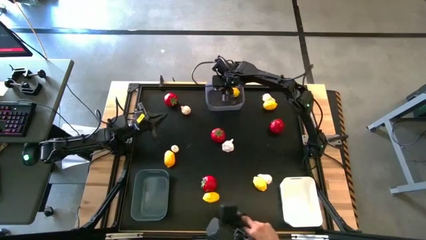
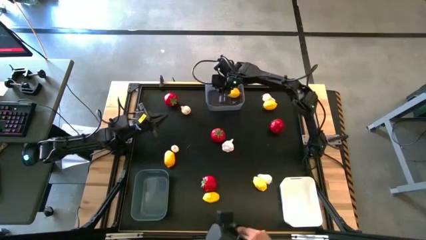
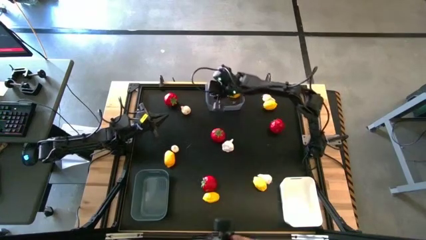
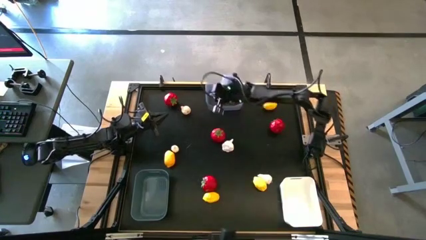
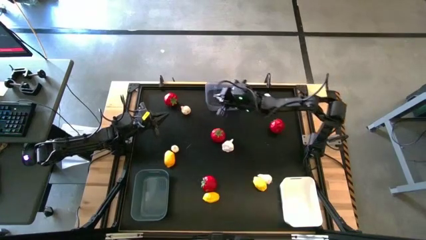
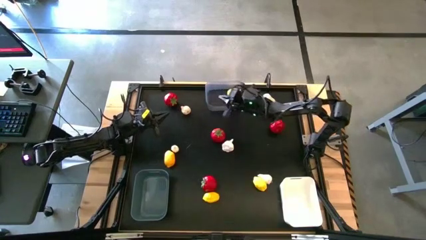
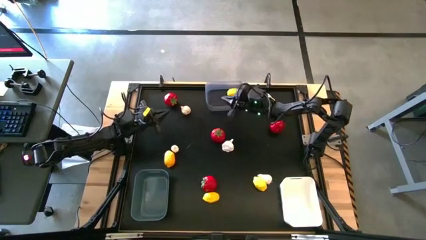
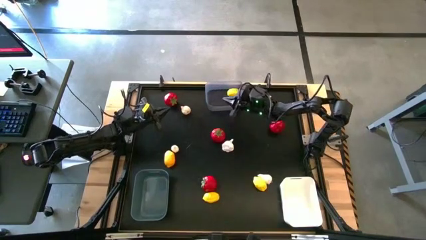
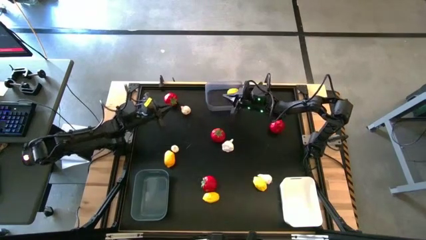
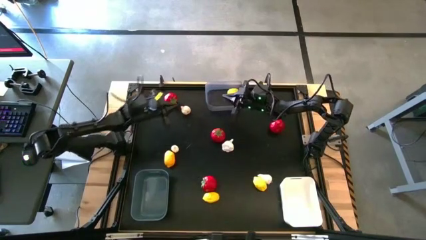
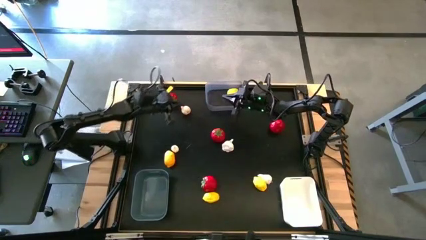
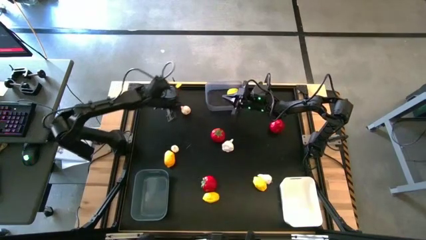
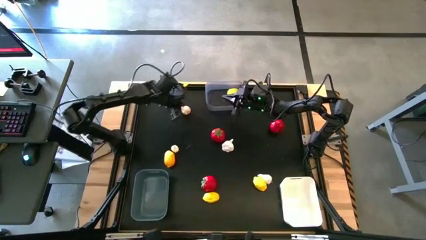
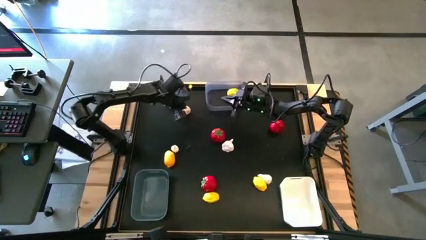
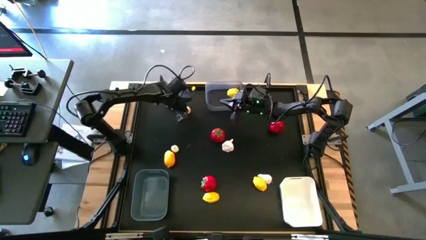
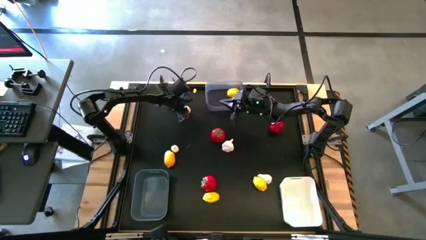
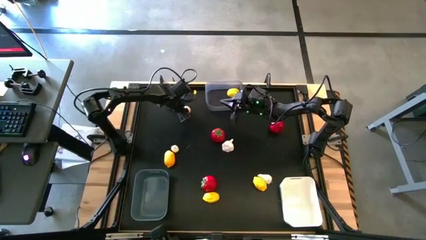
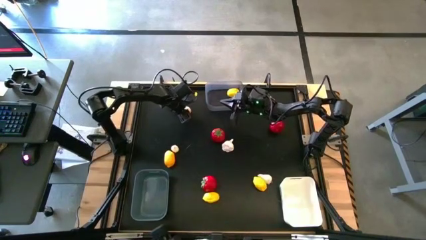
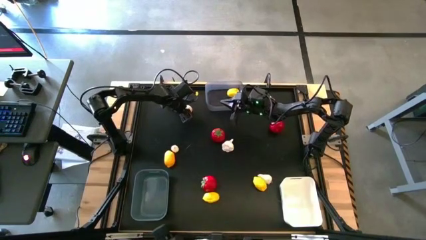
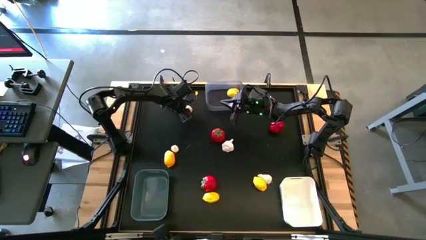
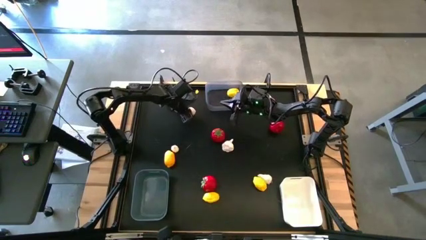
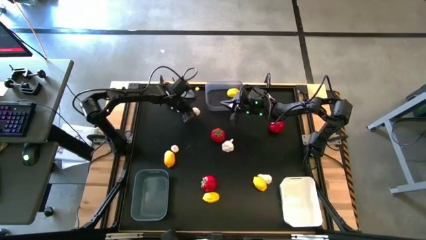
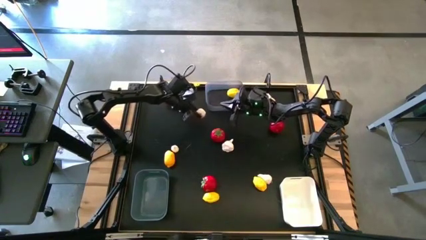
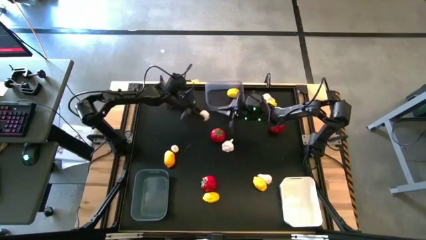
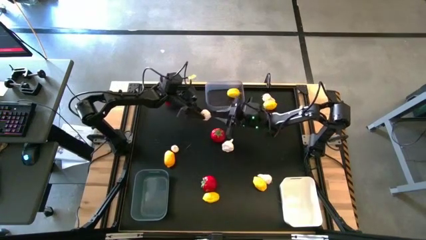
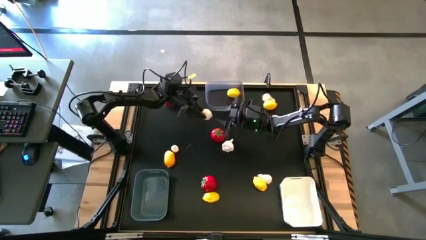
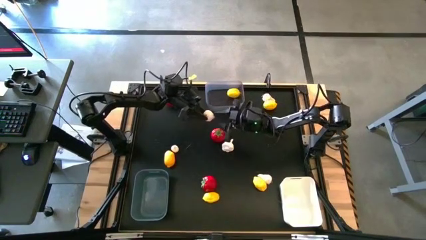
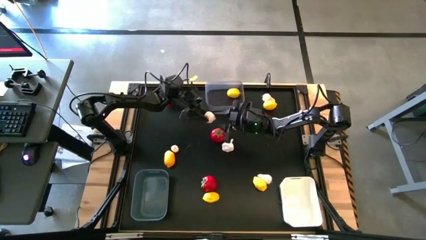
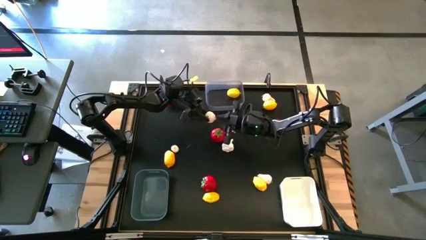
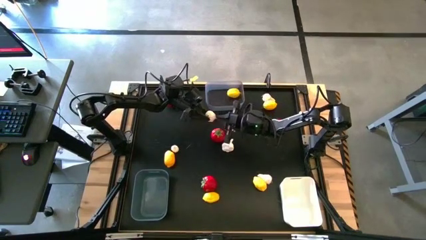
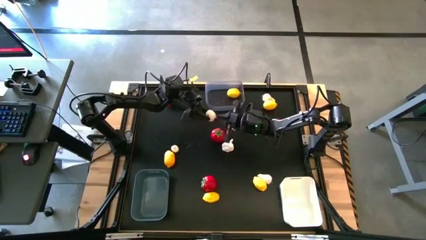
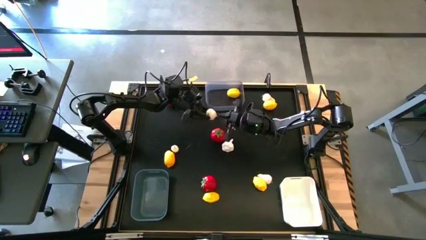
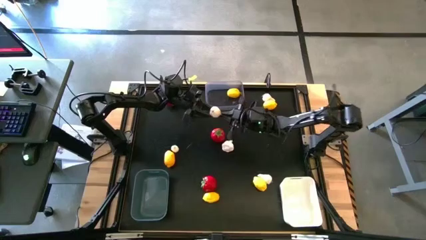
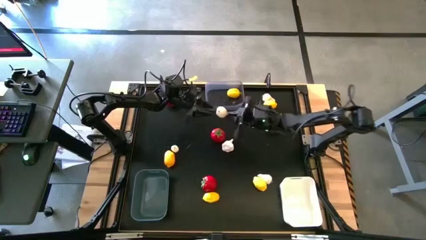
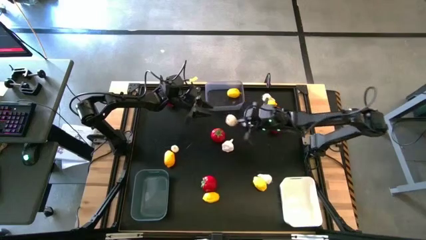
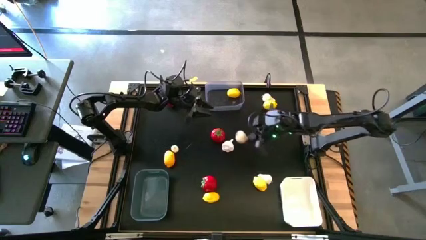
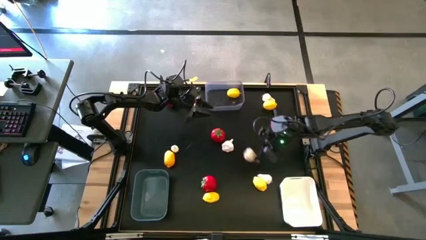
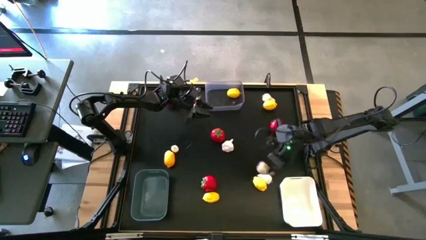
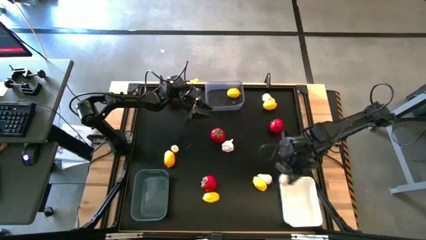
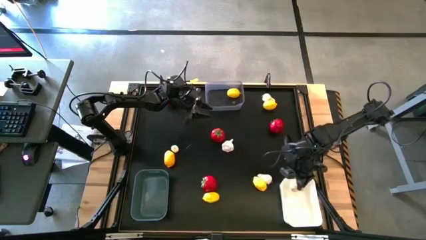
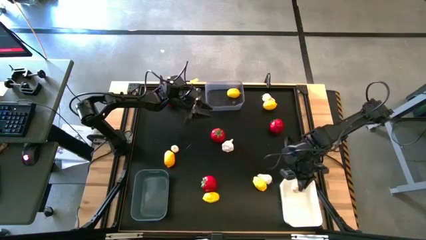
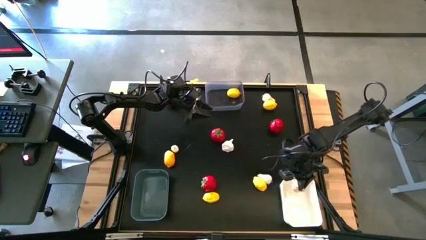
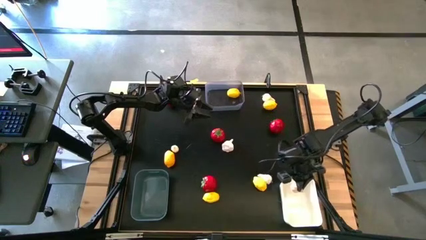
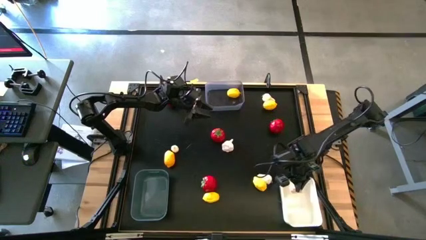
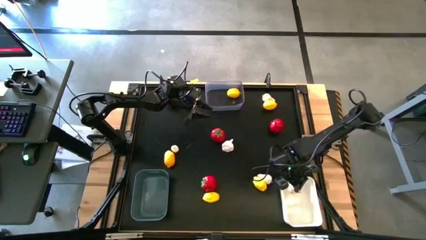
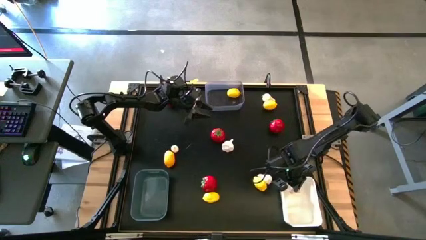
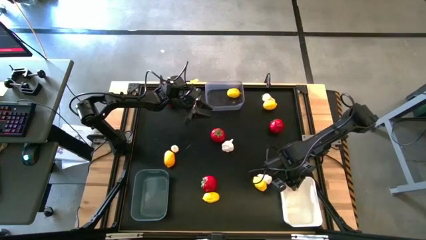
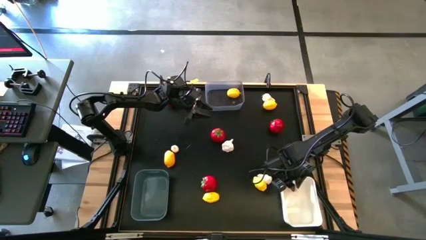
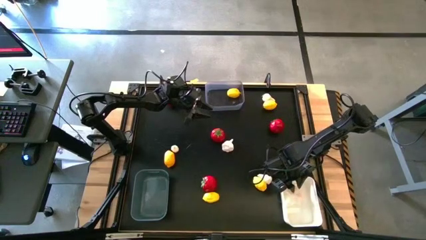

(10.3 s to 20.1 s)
Task: Sort produce into baskets
Put the top left garlic into the white bin

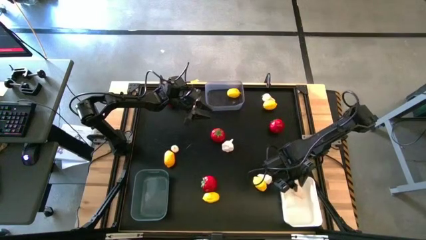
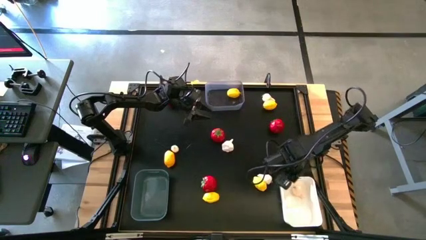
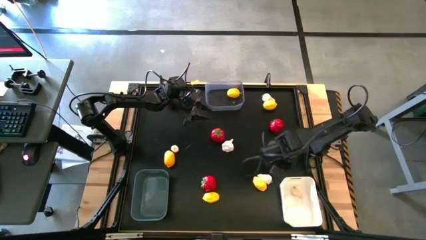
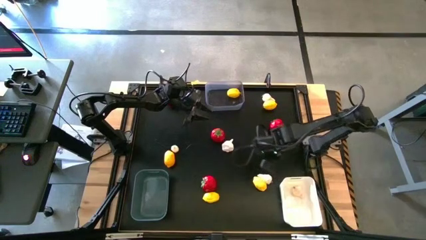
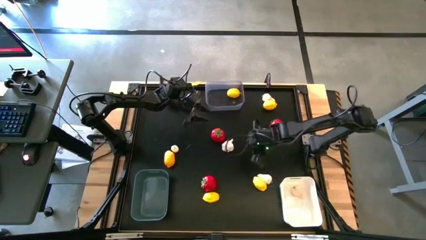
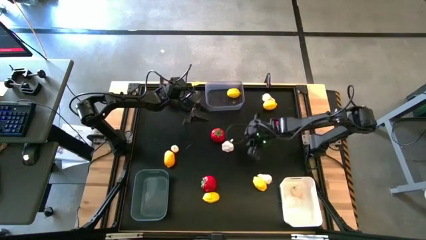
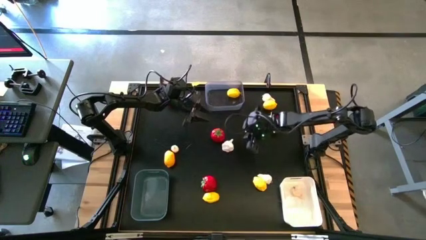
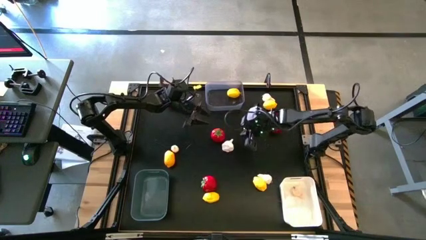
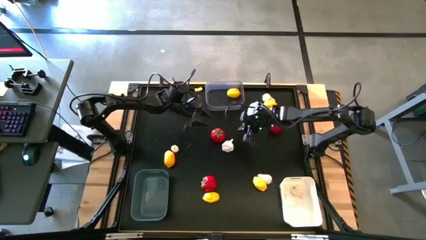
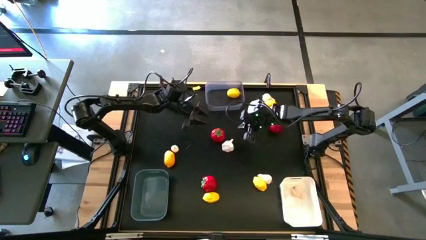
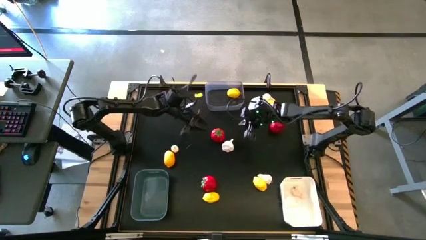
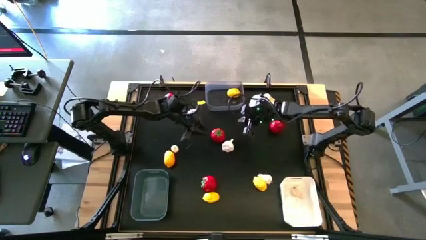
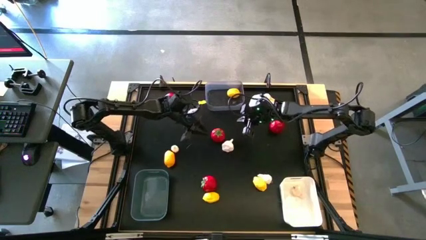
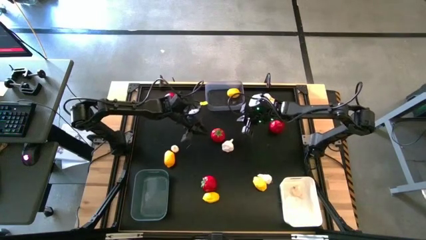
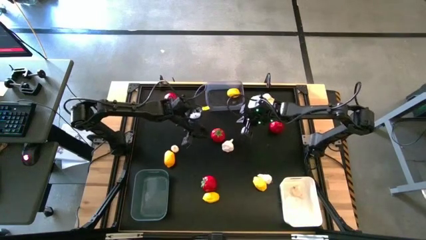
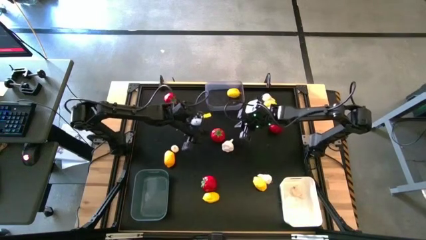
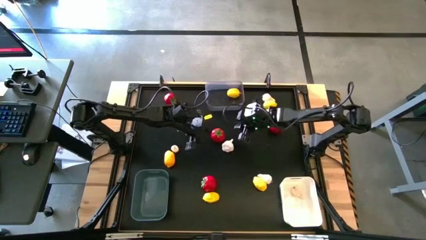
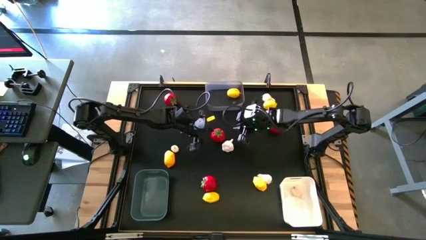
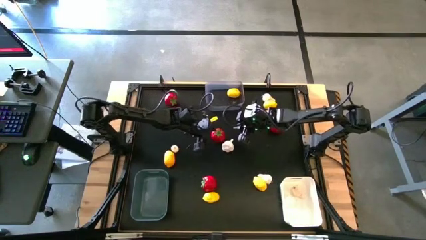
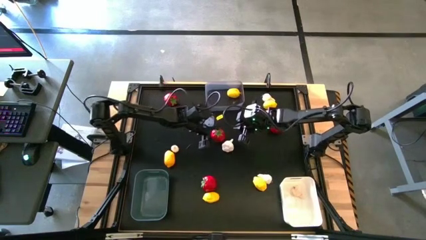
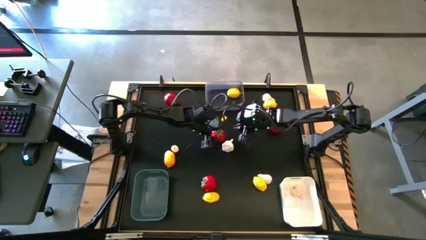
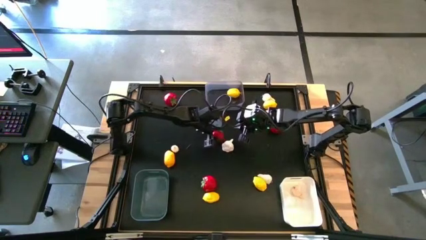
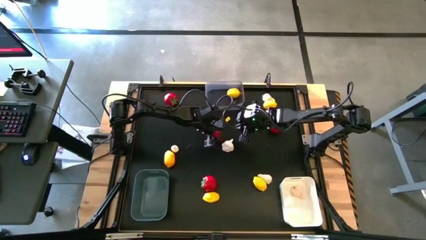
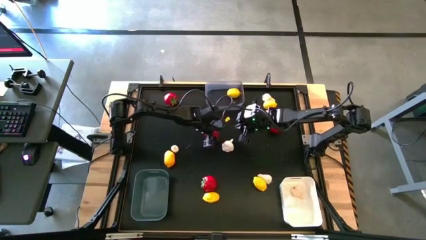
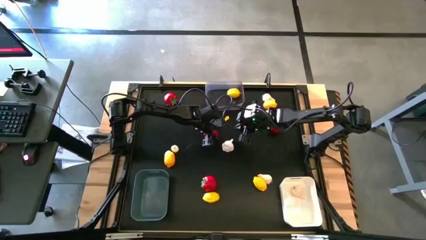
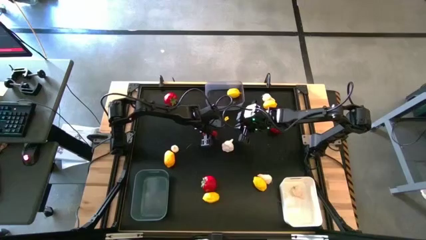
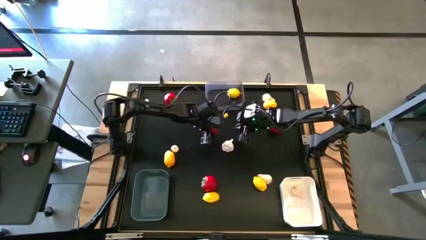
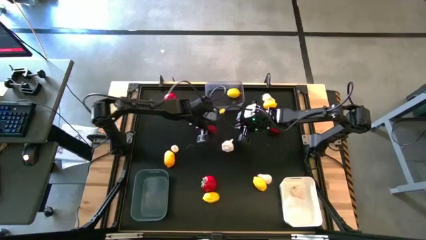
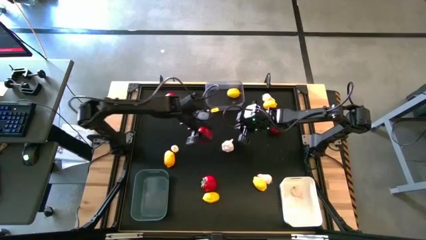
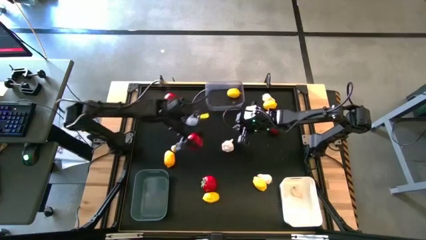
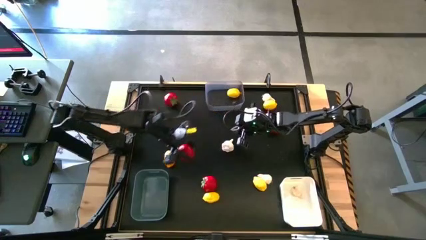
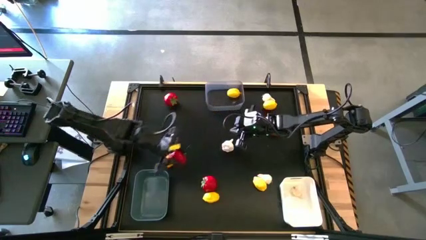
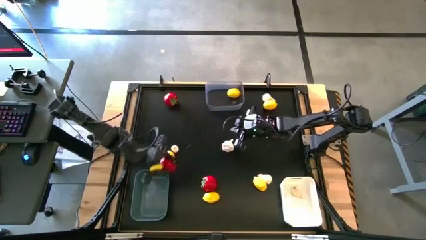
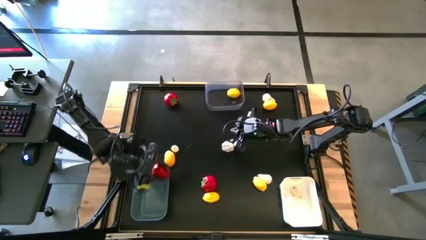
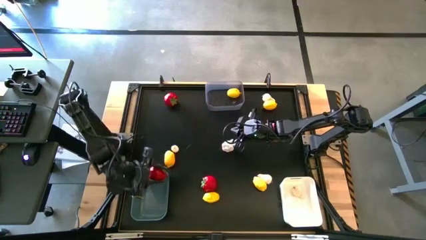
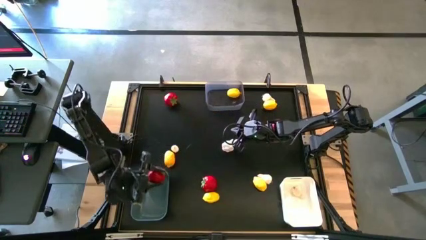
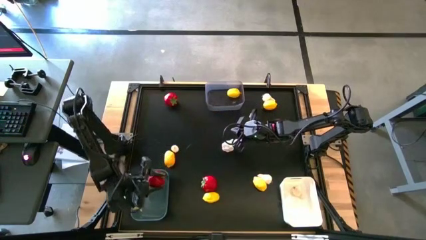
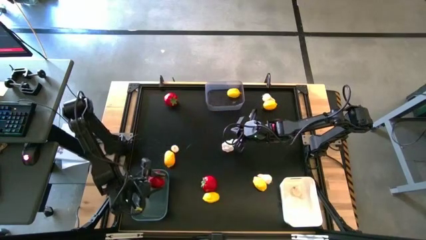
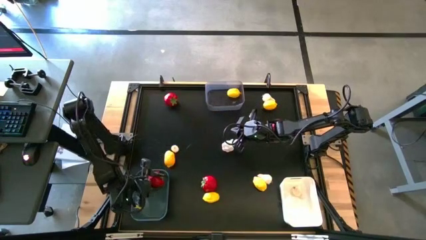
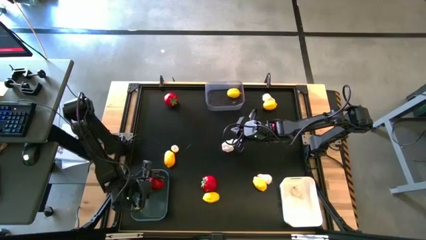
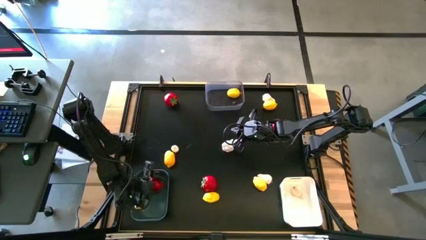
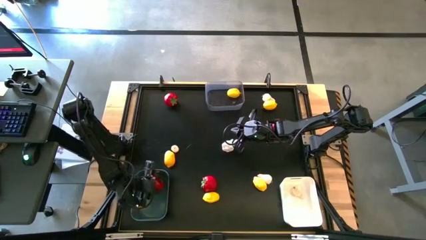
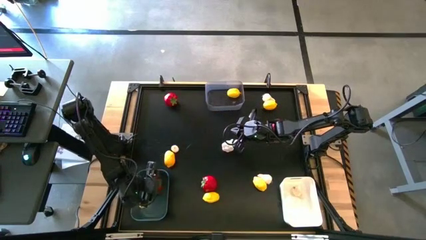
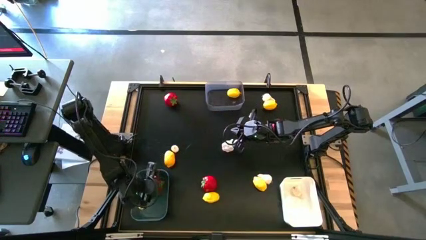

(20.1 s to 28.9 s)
Put the center tomato into the dark green bin
